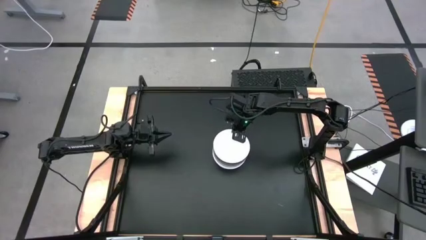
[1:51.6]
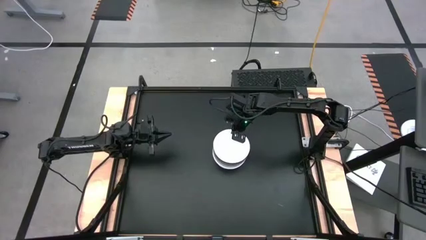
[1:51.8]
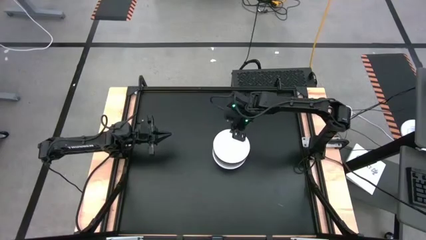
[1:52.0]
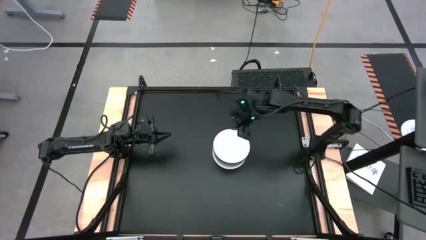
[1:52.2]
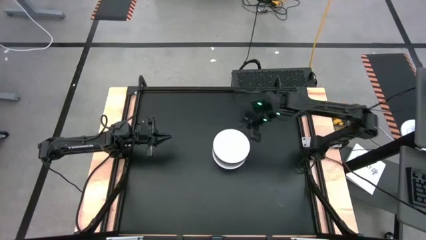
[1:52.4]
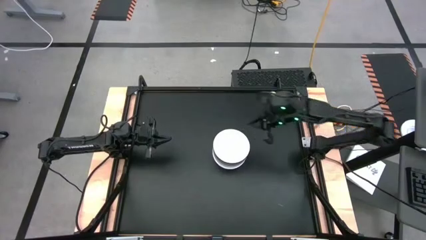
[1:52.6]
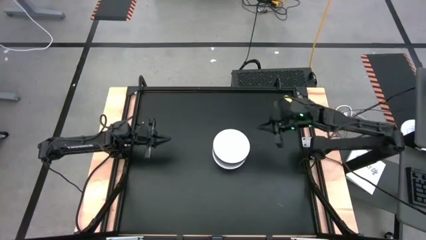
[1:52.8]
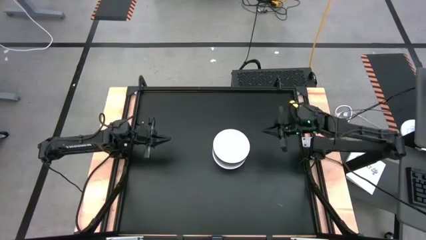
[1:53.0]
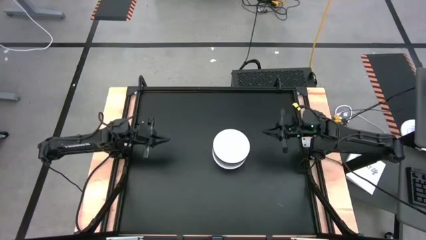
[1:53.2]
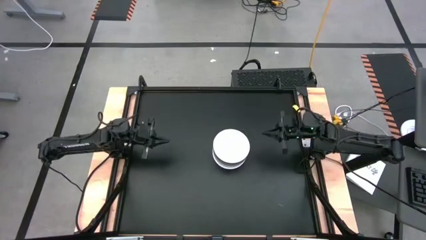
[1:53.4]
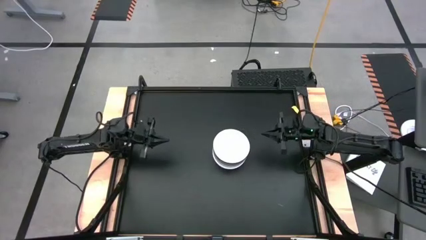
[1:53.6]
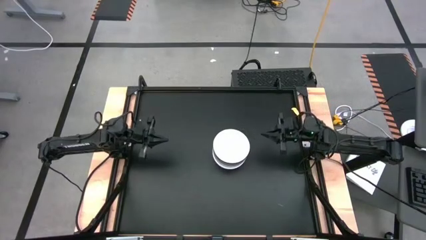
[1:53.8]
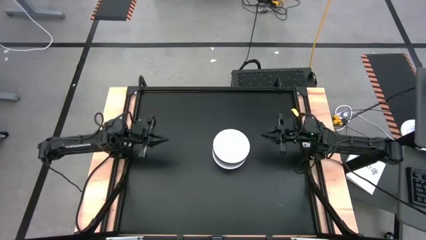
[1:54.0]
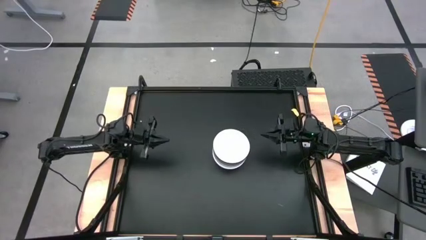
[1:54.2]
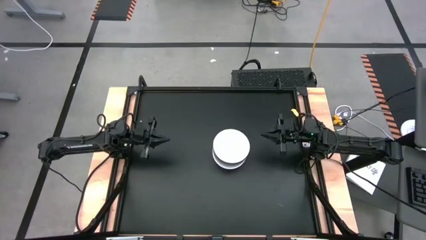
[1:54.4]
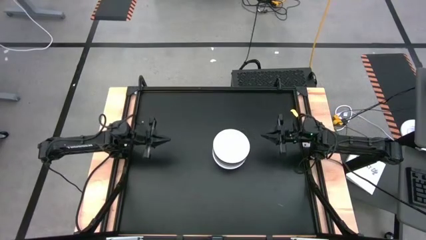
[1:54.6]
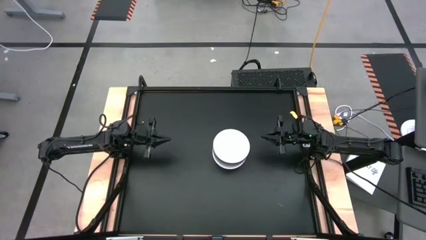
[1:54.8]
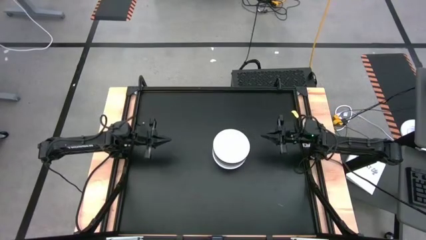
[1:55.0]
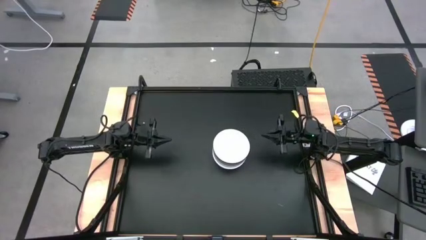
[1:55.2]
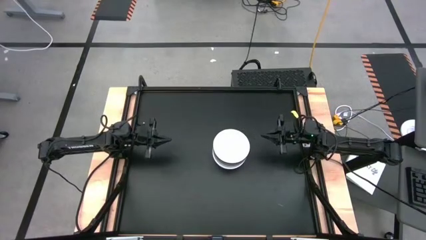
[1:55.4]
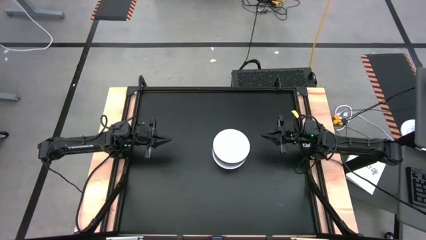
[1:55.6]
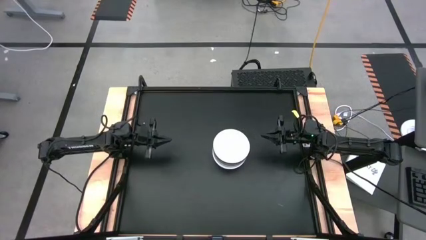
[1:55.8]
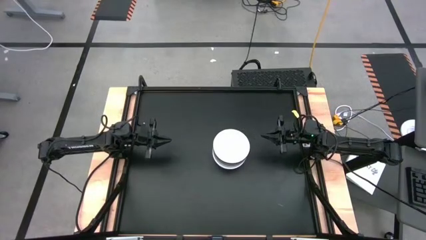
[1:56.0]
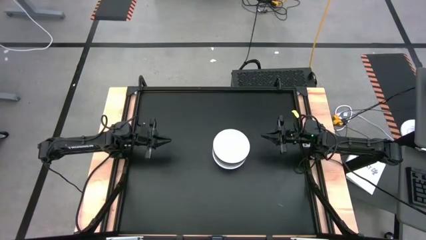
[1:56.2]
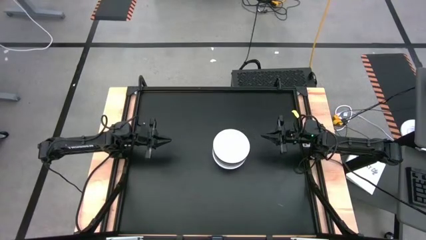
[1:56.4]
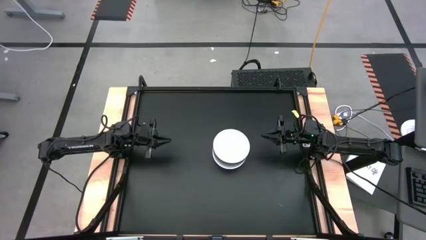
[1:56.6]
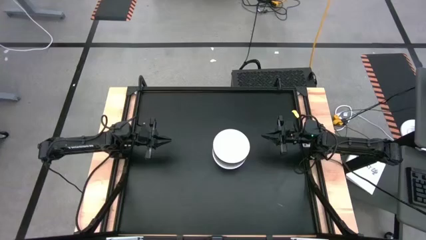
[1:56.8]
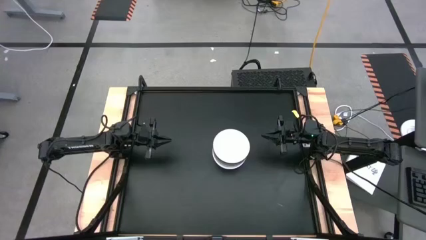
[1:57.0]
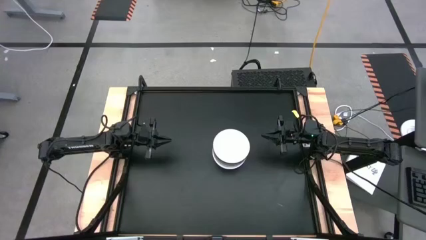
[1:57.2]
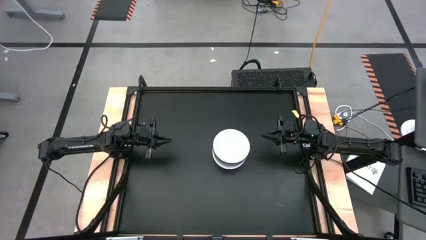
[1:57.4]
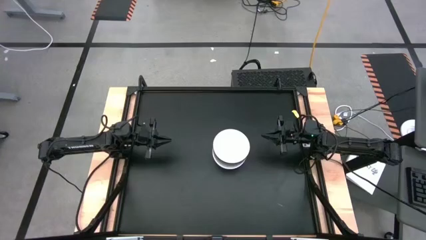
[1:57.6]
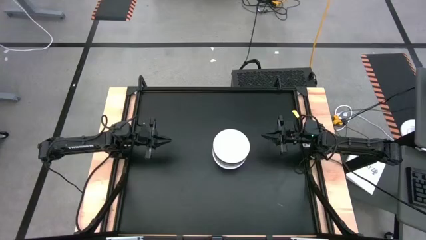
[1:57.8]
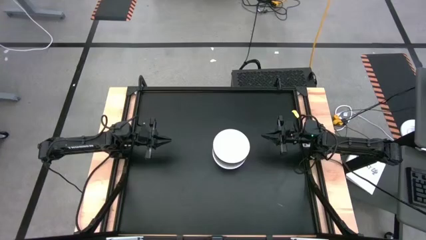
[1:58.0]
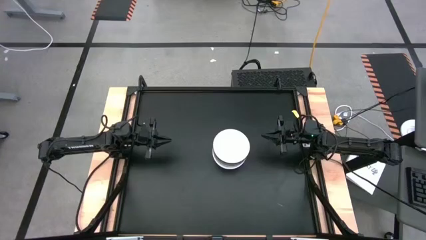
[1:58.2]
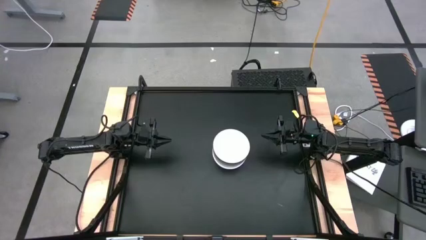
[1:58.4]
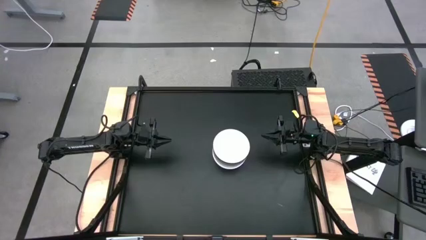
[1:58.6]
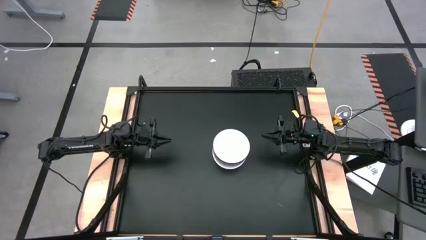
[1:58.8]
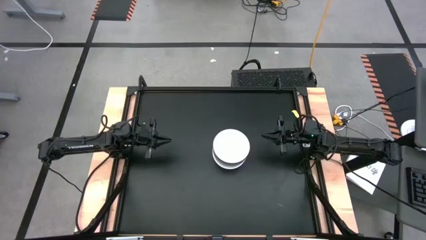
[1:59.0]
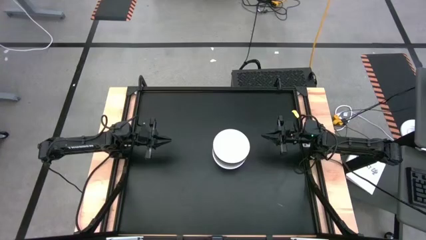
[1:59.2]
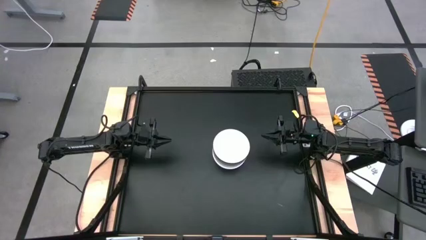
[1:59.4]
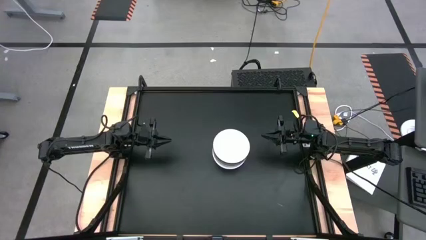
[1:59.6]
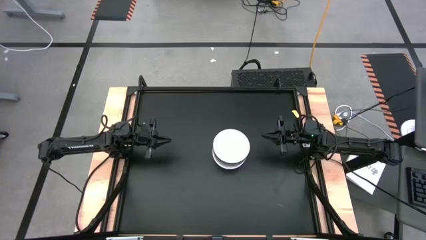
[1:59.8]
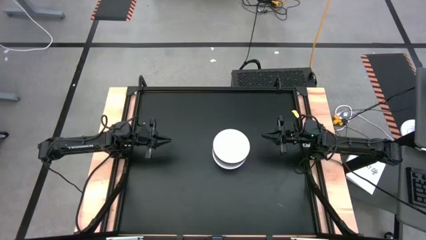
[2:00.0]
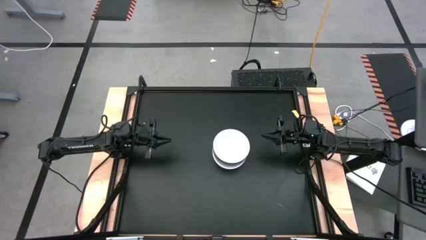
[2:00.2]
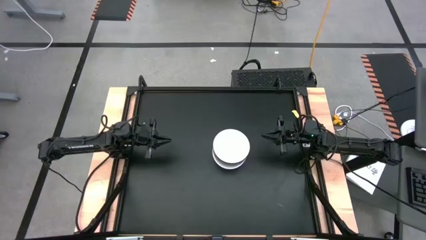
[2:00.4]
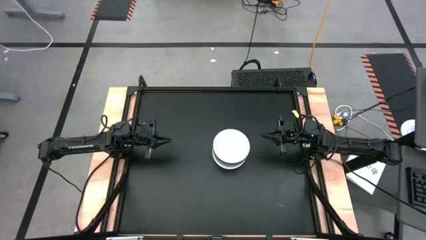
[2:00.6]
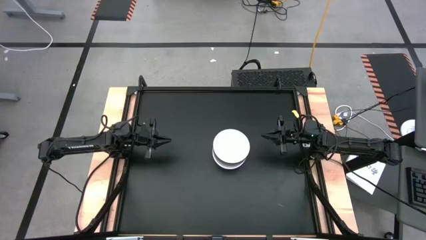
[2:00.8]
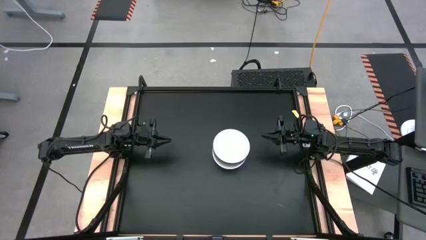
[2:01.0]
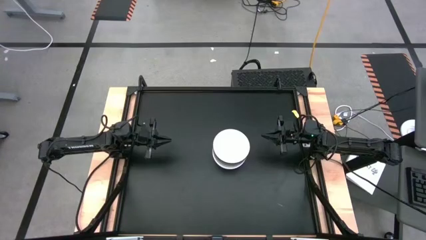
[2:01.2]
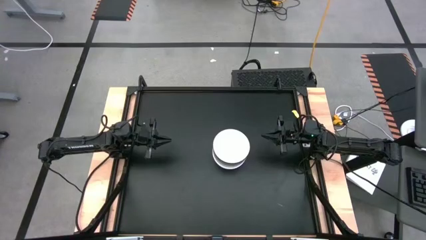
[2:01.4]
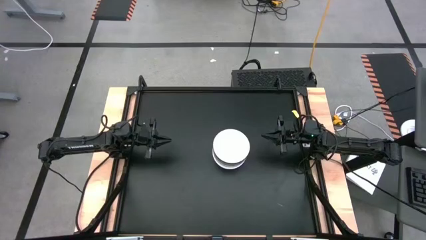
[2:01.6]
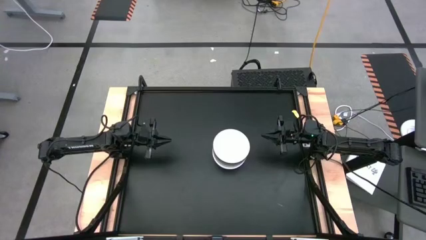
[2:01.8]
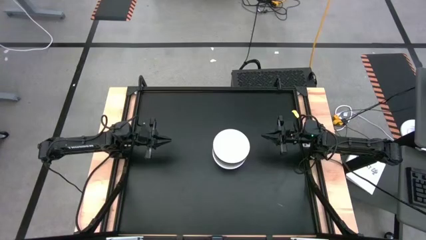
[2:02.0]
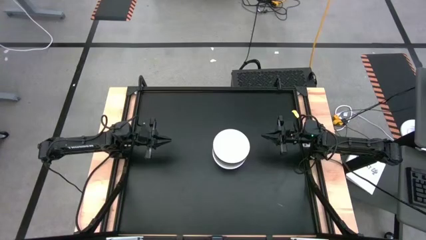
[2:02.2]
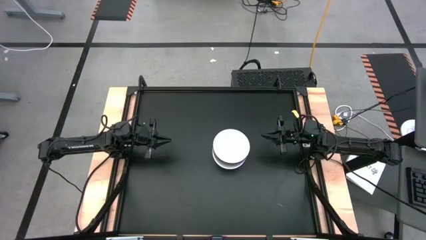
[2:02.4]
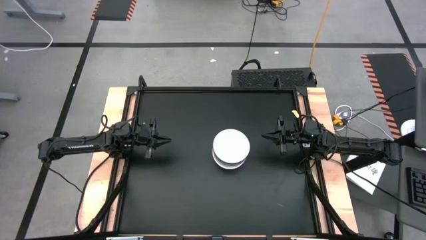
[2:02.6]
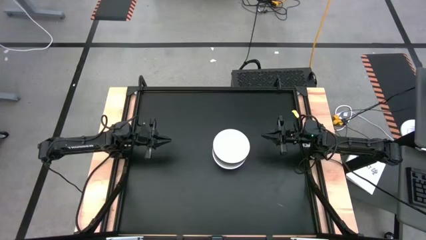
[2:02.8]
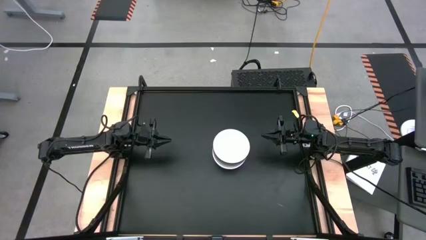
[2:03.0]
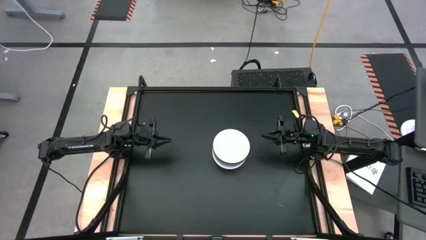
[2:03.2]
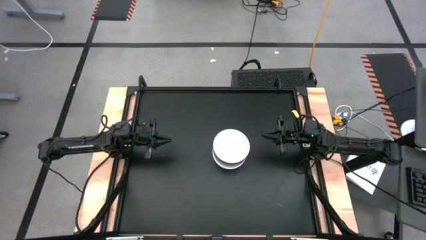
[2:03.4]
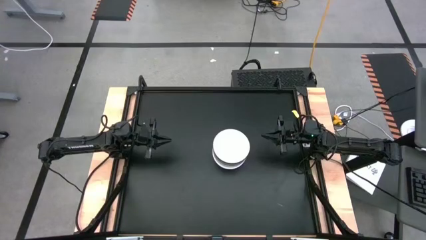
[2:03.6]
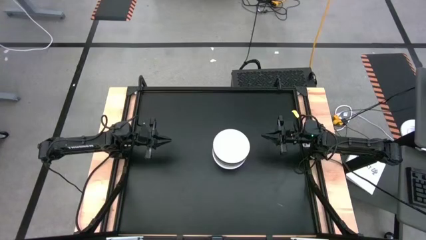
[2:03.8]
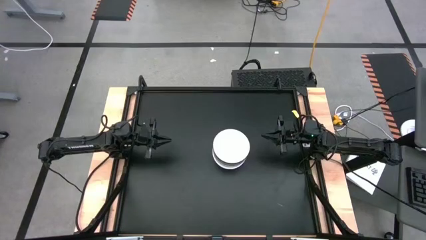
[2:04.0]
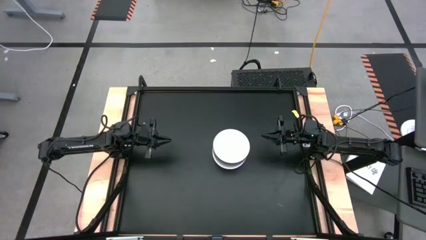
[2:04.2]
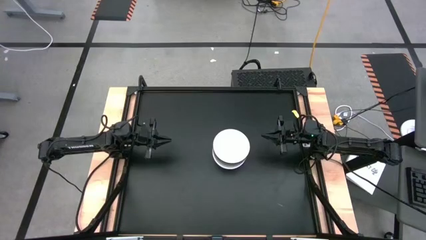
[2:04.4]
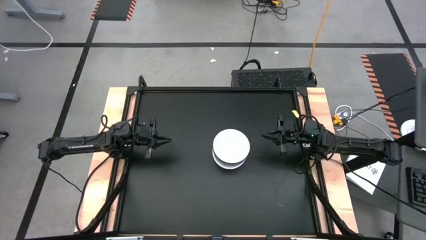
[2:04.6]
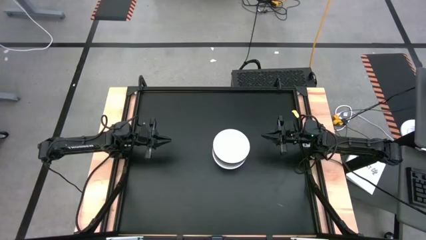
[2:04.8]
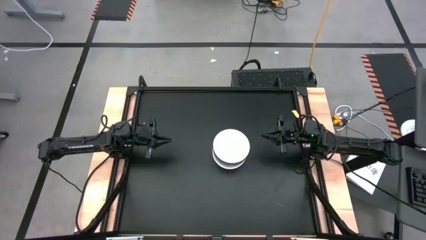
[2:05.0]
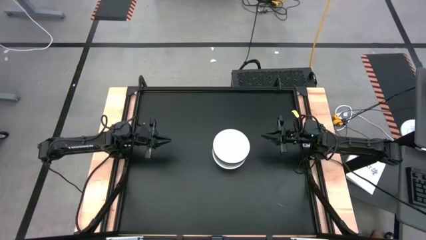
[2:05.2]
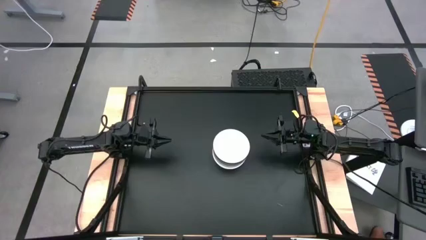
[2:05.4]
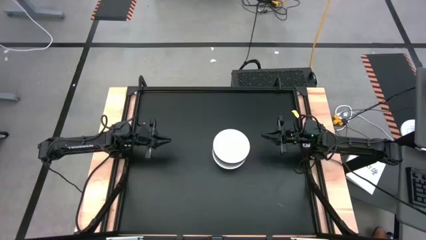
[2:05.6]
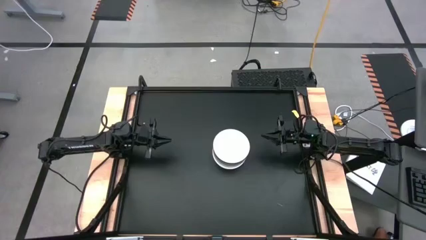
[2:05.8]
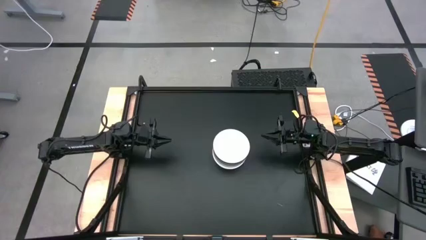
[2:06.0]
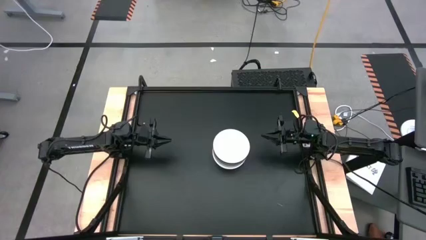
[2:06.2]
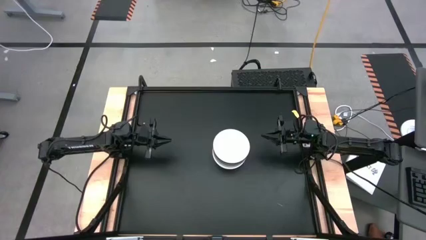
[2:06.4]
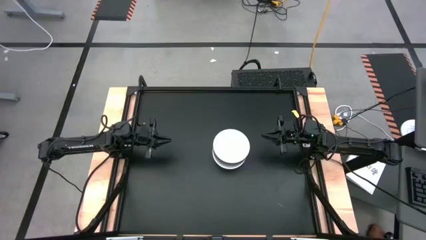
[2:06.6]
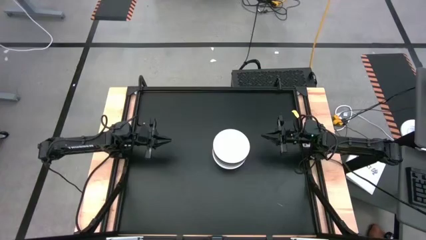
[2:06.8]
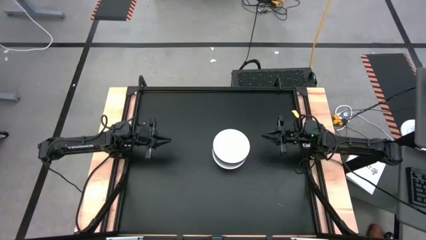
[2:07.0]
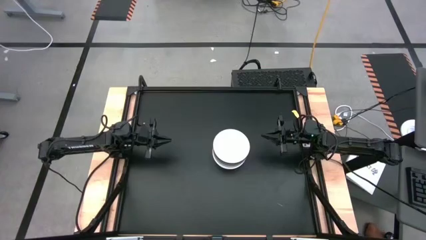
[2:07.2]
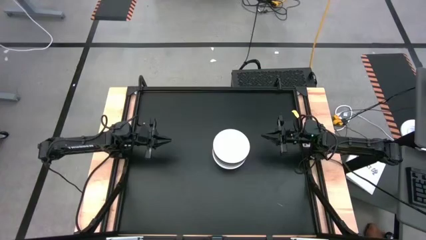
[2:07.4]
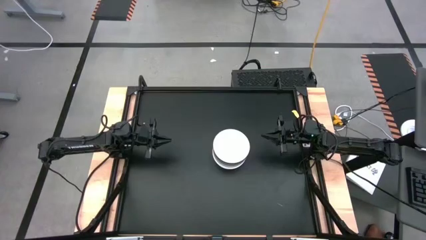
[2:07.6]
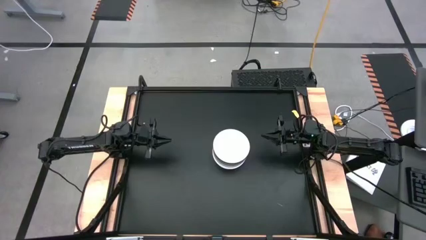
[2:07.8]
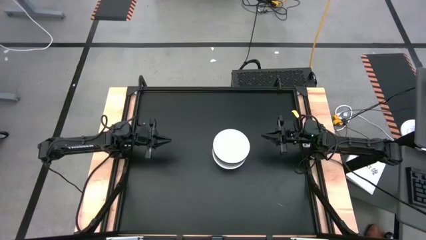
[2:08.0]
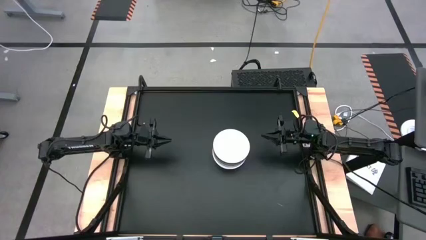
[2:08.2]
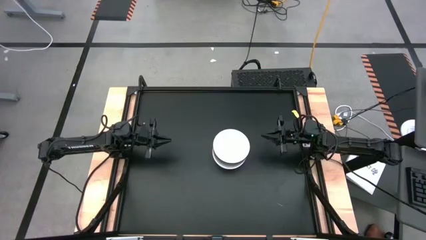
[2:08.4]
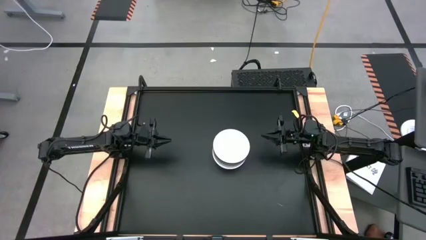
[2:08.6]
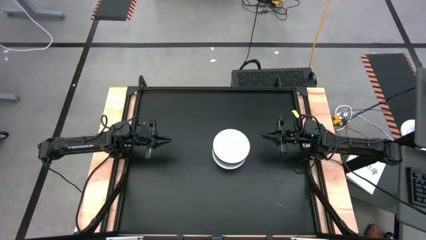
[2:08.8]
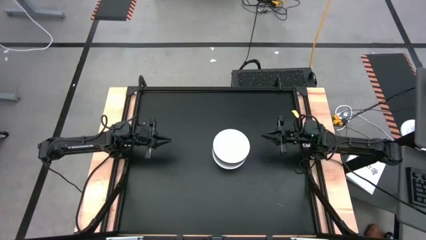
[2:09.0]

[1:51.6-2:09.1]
Task: Nest bowls inside each other
Return to Home Position
